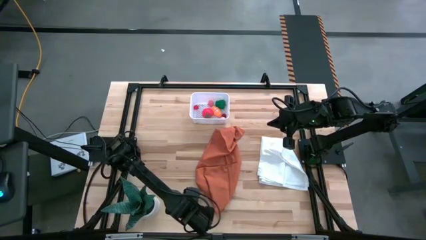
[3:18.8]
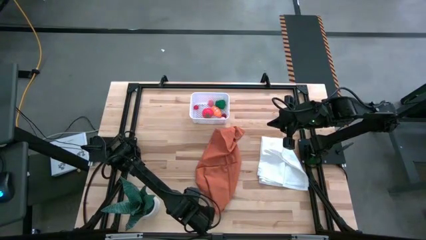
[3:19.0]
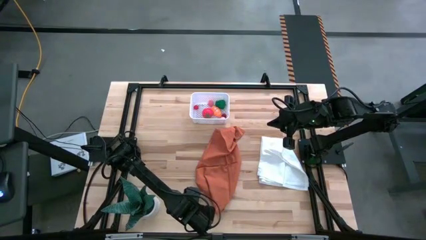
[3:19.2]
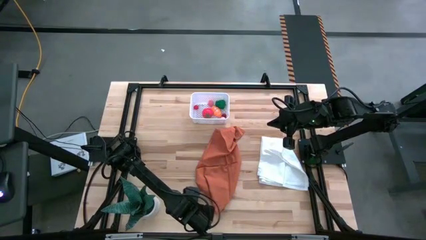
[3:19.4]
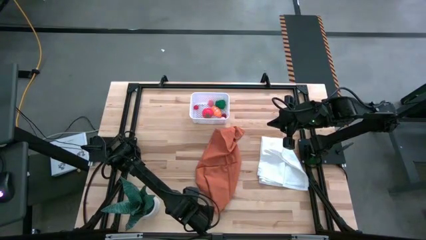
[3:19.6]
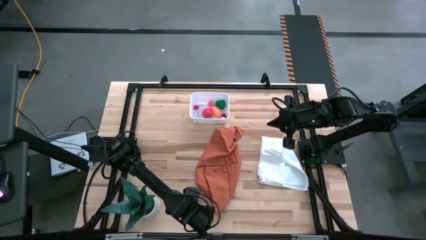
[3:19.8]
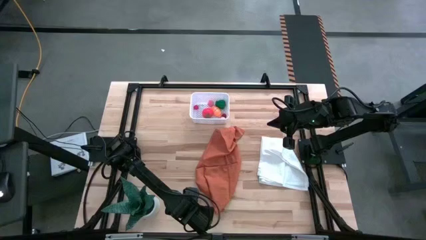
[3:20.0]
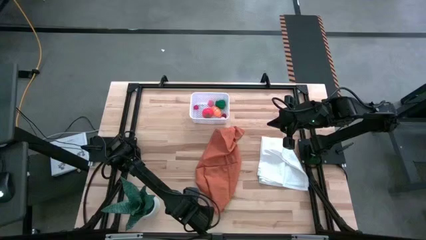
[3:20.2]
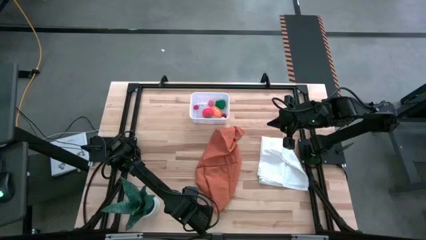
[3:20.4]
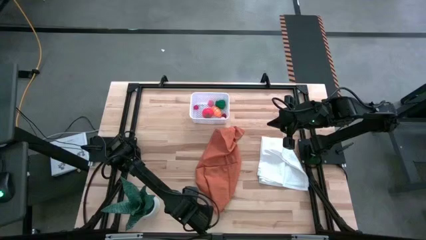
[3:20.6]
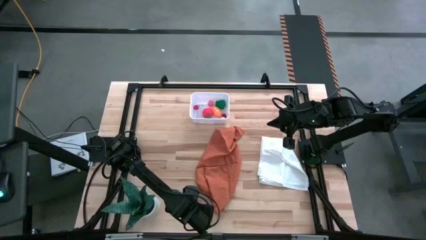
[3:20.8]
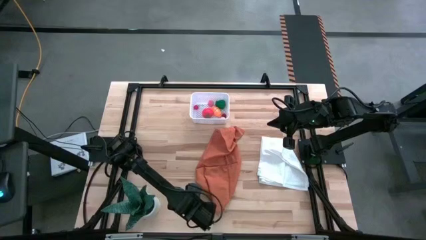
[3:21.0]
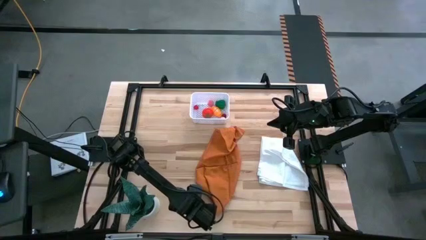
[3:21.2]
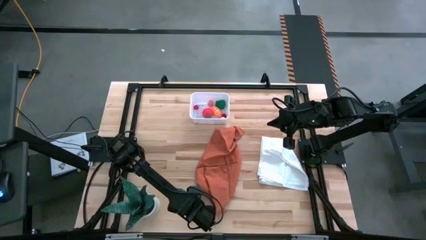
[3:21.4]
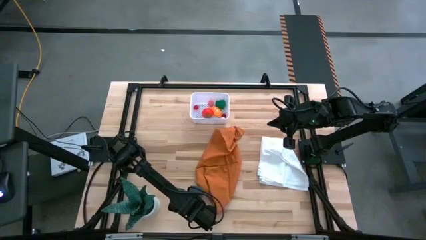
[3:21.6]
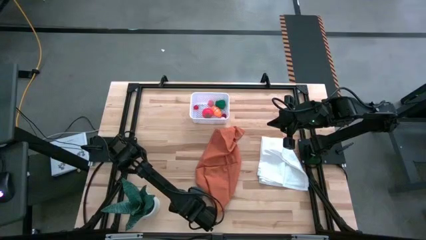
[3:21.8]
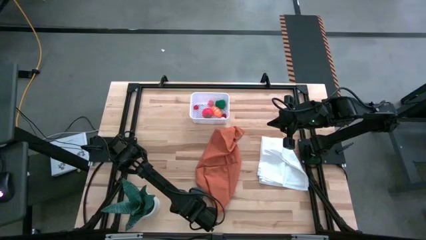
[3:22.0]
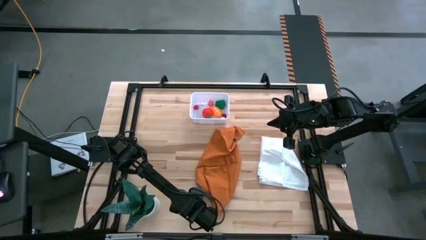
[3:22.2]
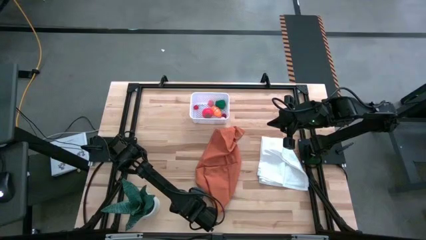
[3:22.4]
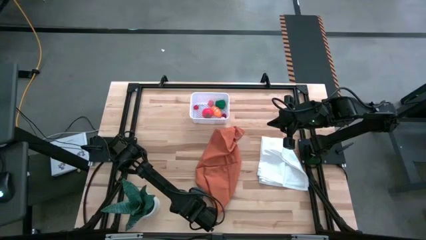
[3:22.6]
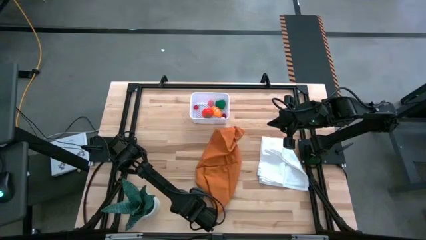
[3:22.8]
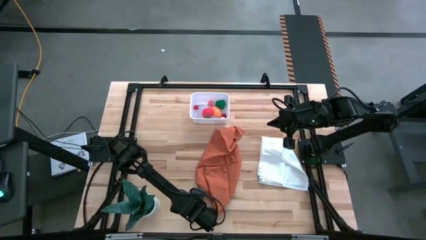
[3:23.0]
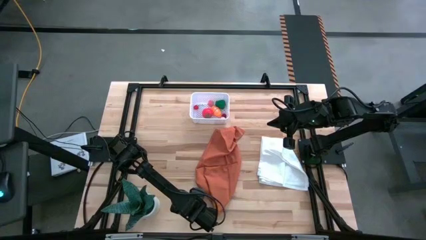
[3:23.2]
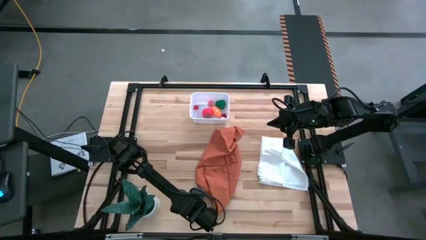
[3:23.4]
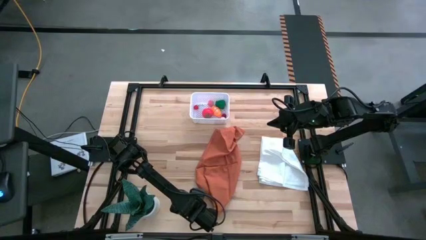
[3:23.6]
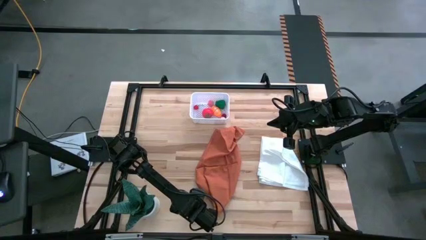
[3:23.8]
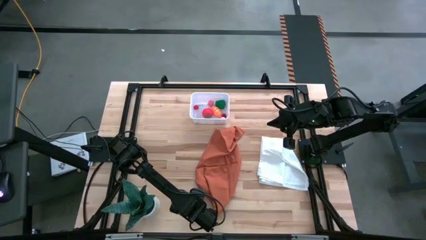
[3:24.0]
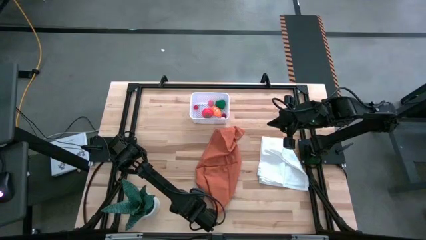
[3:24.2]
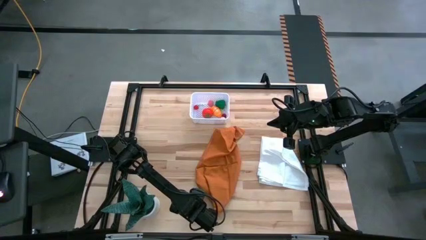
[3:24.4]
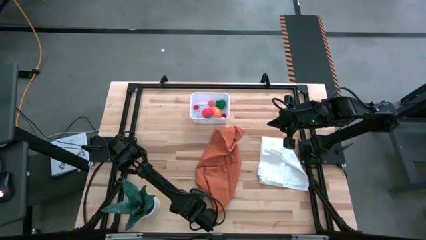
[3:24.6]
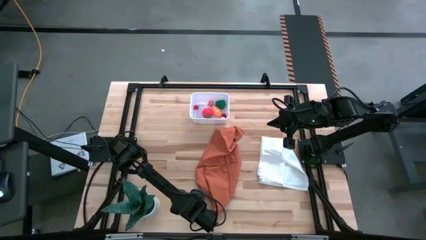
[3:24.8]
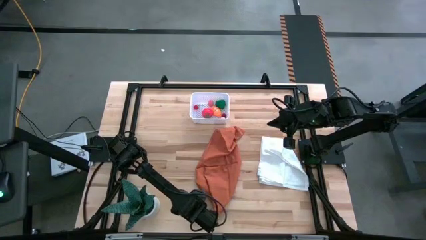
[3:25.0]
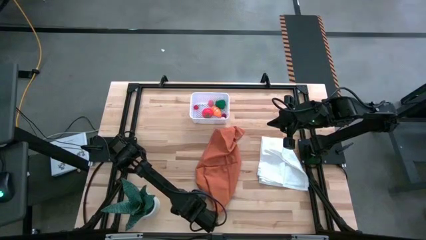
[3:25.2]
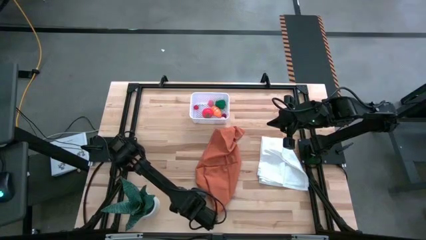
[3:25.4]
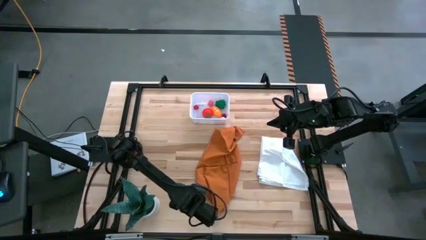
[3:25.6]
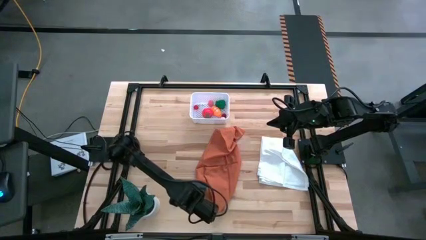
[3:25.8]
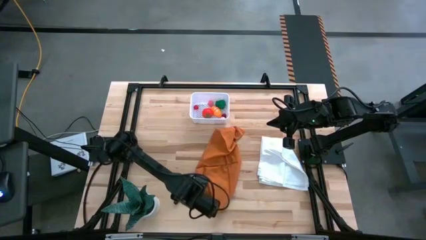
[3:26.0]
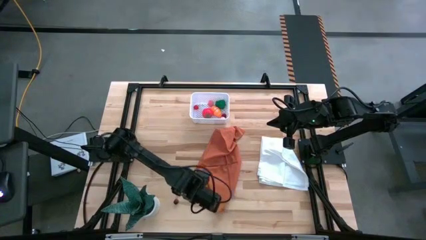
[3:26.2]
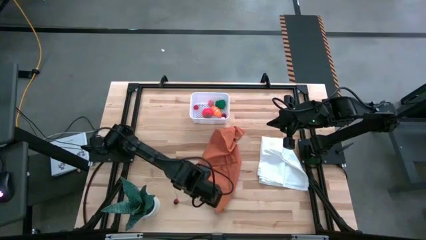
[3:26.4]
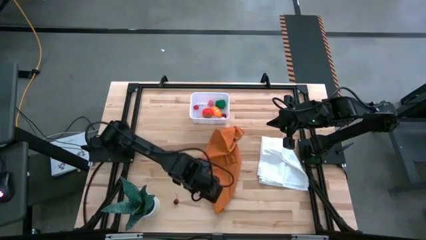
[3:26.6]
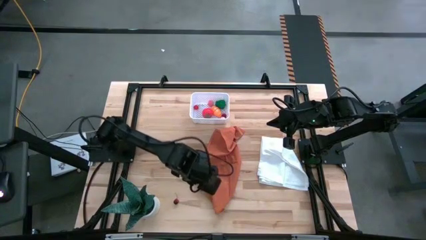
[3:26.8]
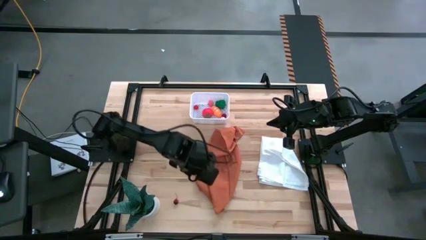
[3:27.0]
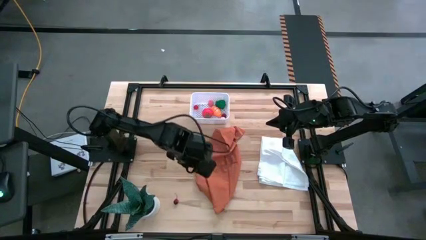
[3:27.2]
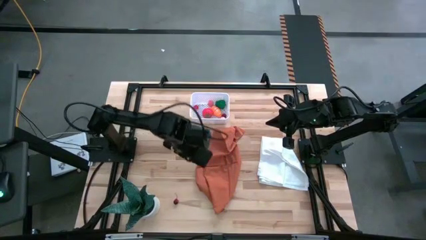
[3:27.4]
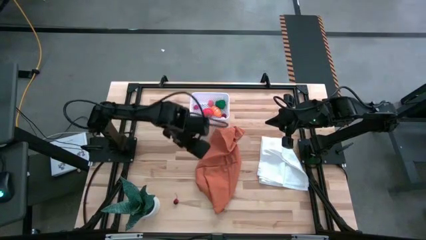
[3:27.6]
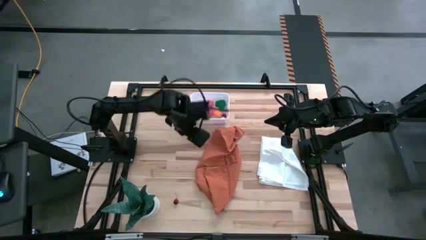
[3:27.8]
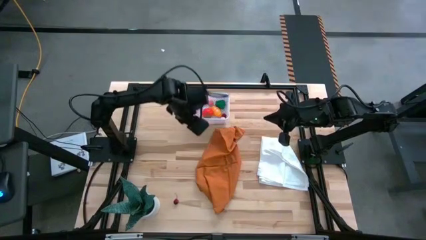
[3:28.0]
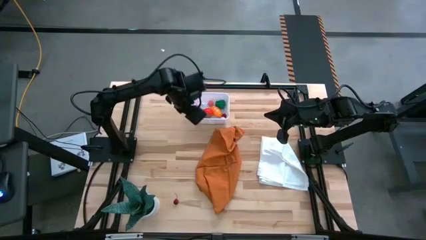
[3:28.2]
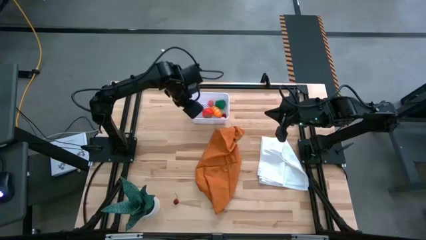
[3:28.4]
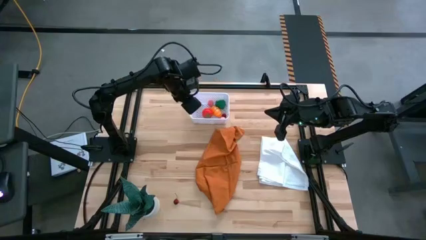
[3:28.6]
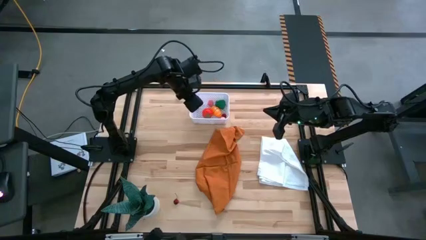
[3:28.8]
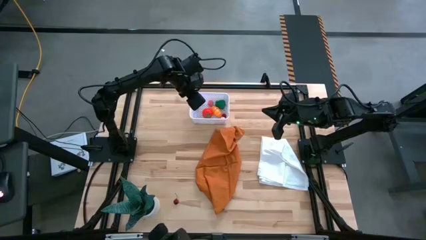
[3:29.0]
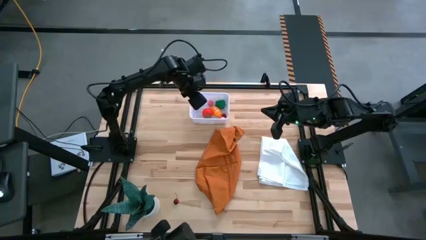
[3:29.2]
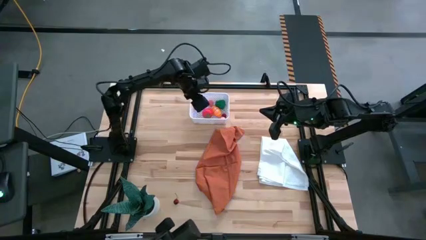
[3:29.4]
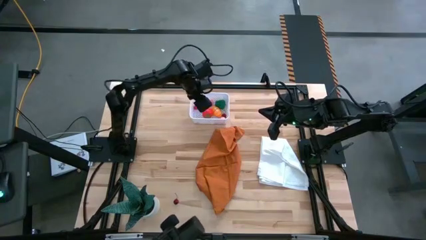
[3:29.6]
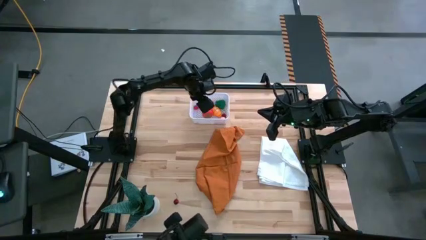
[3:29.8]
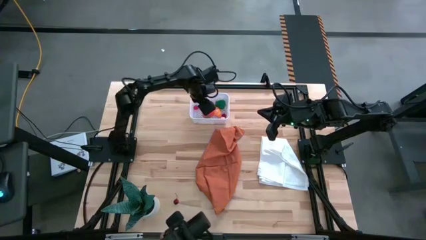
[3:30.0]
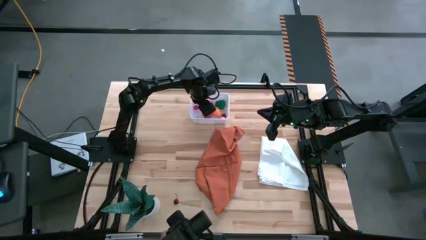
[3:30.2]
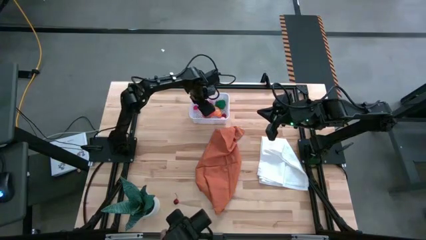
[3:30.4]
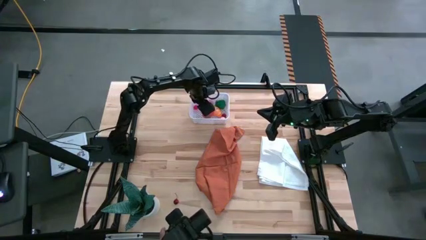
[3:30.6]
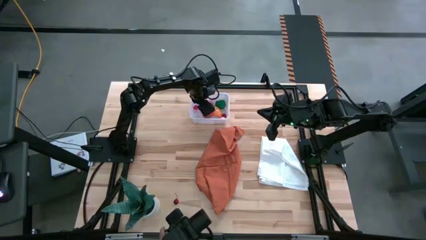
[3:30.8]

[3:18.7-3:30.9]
Task: Pick and placing Produce into tupperware
Put the pink peach into the white basket
